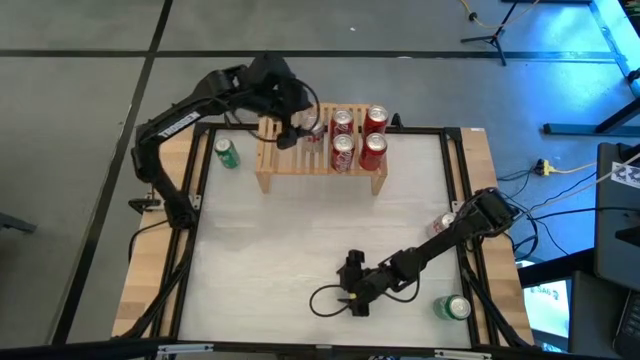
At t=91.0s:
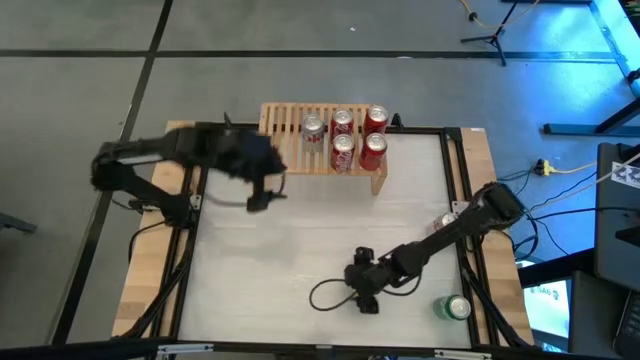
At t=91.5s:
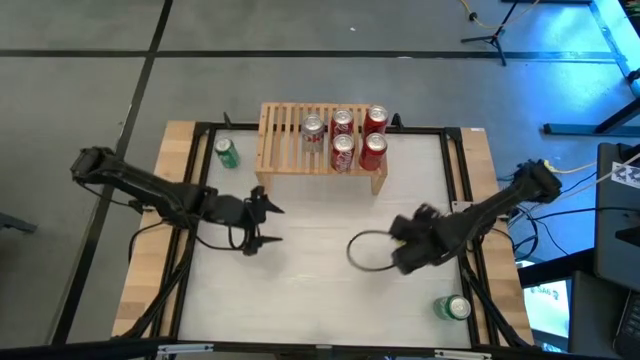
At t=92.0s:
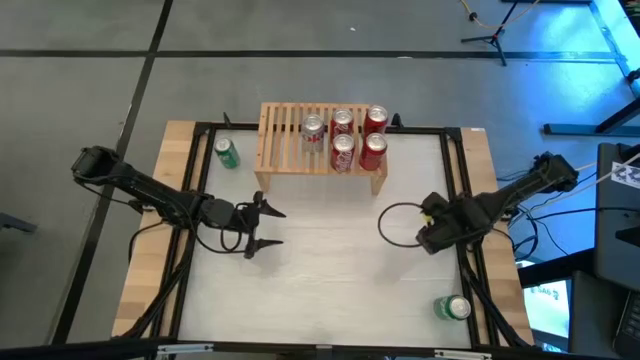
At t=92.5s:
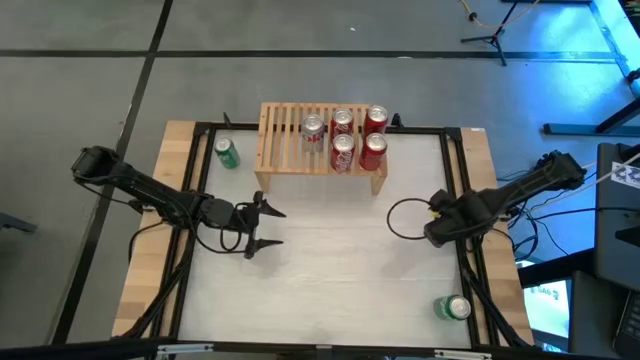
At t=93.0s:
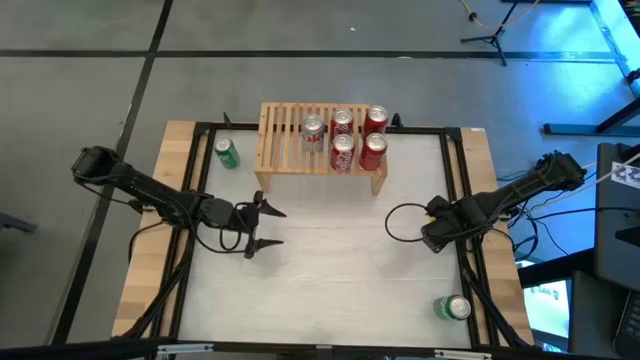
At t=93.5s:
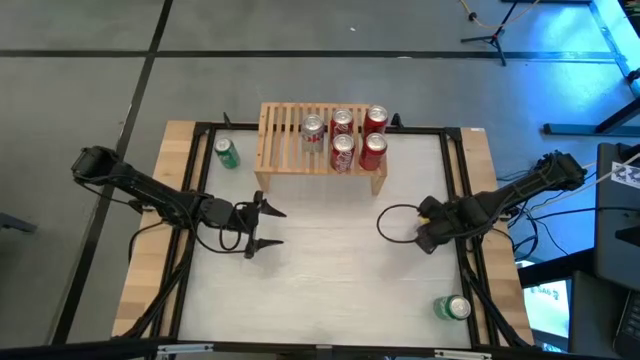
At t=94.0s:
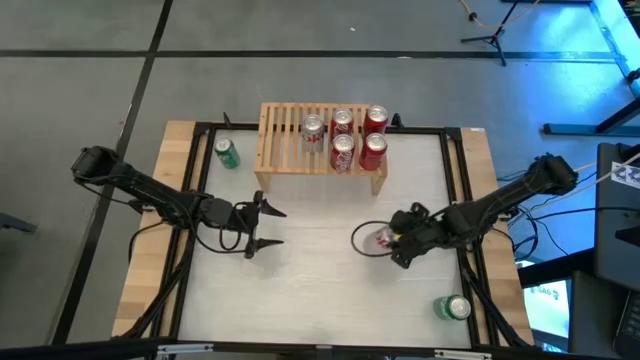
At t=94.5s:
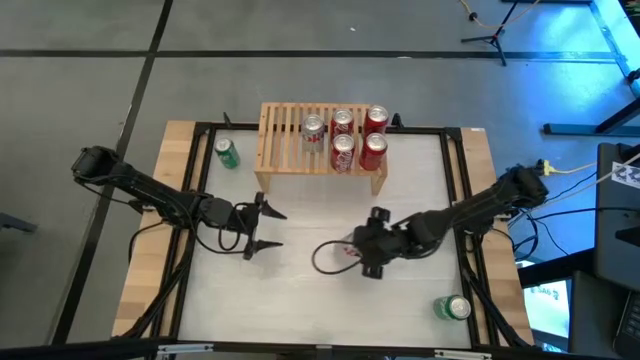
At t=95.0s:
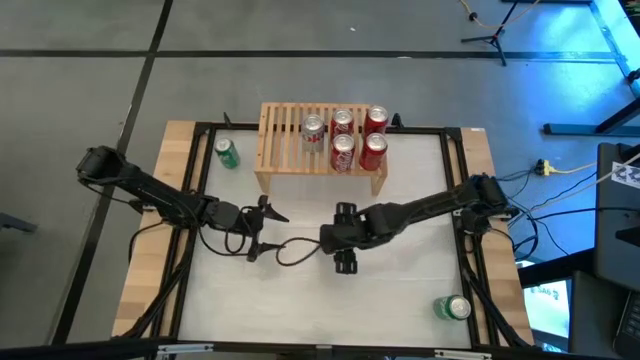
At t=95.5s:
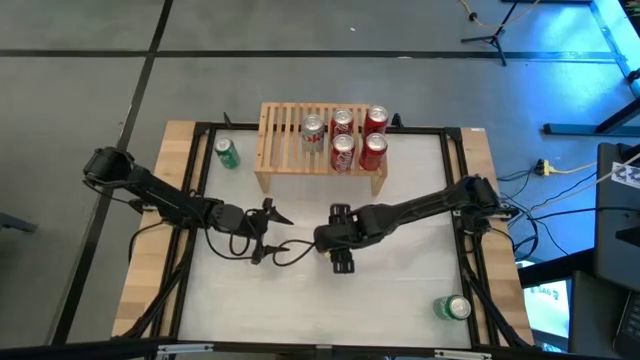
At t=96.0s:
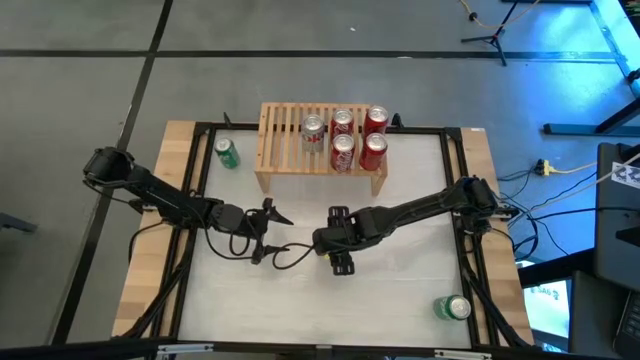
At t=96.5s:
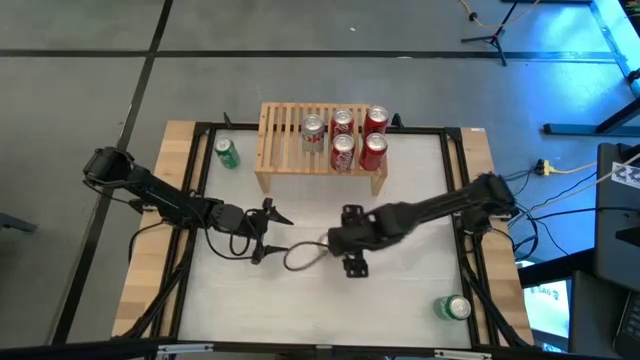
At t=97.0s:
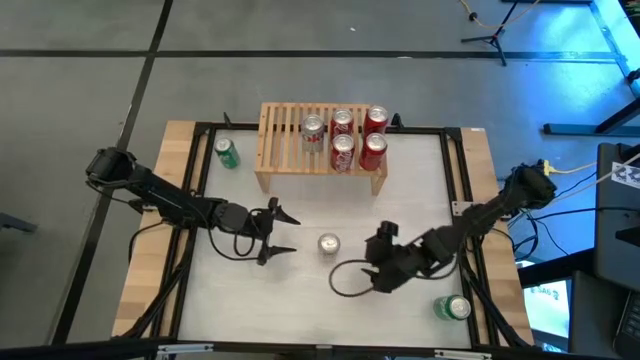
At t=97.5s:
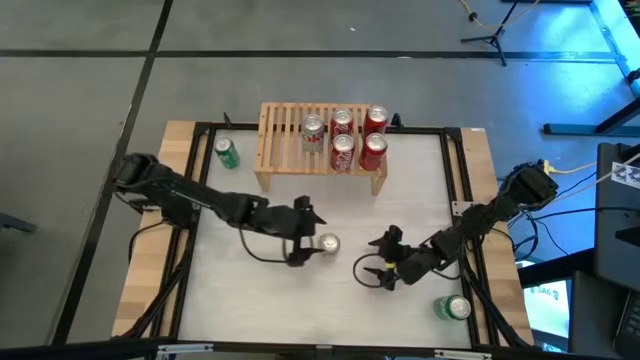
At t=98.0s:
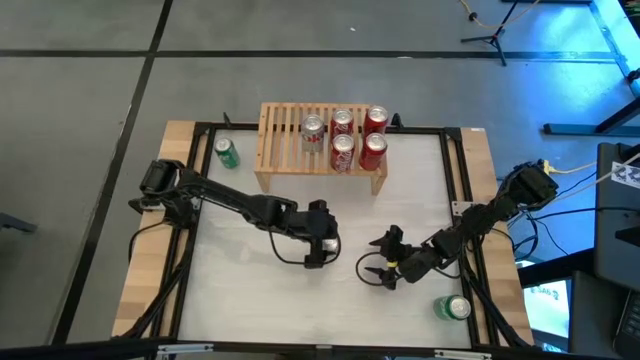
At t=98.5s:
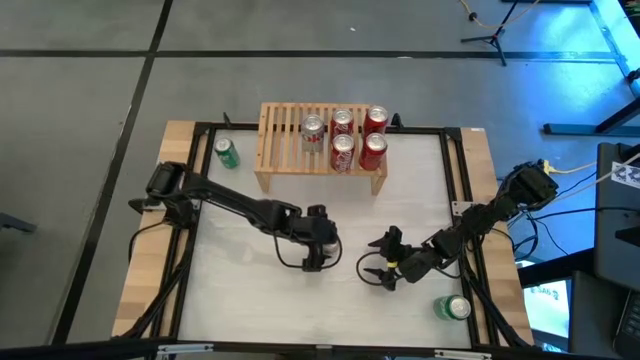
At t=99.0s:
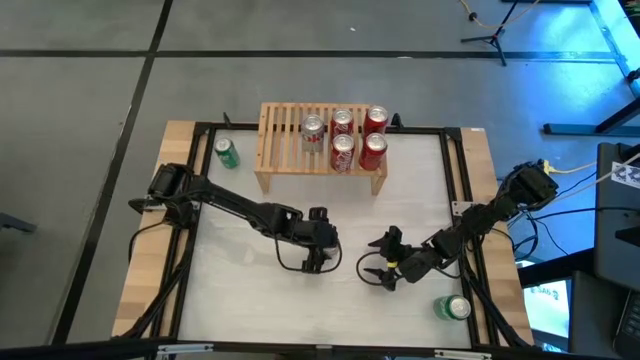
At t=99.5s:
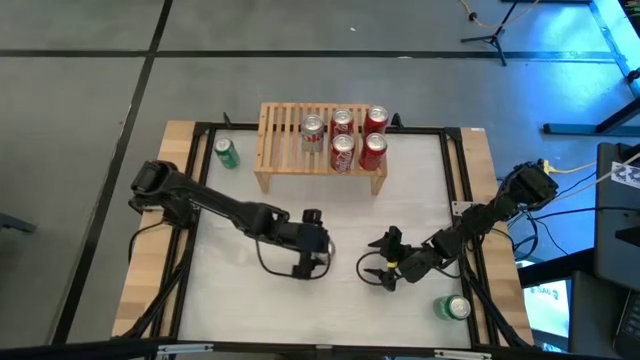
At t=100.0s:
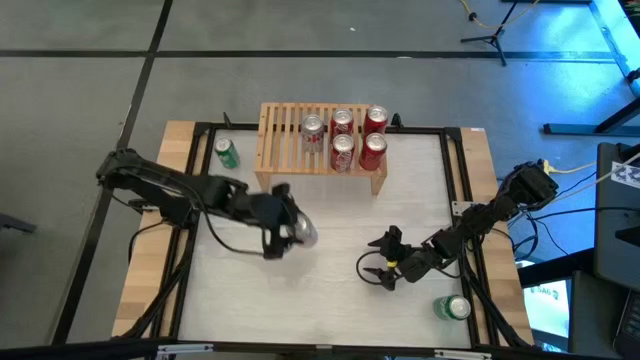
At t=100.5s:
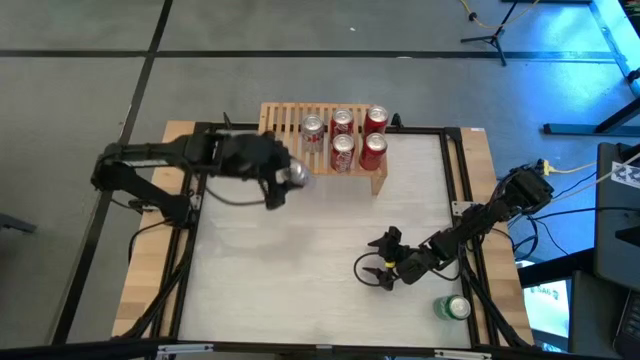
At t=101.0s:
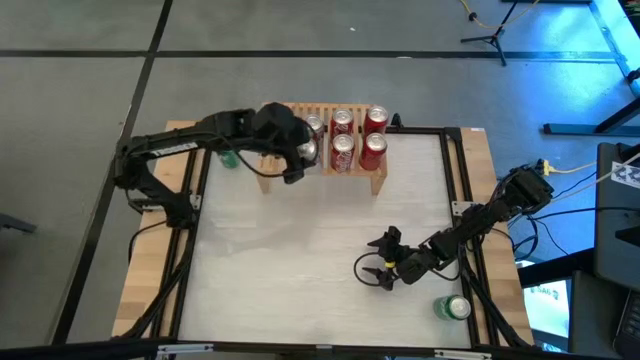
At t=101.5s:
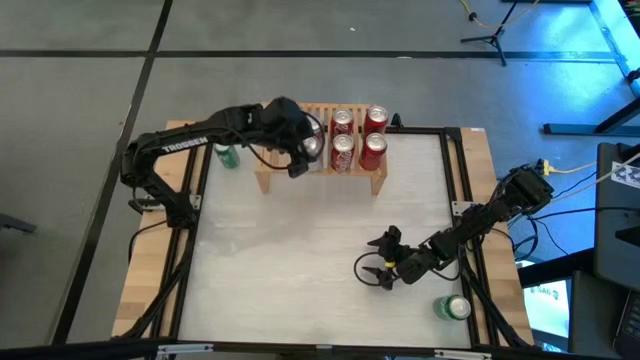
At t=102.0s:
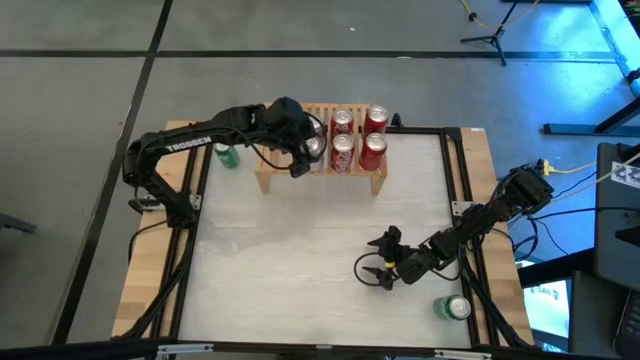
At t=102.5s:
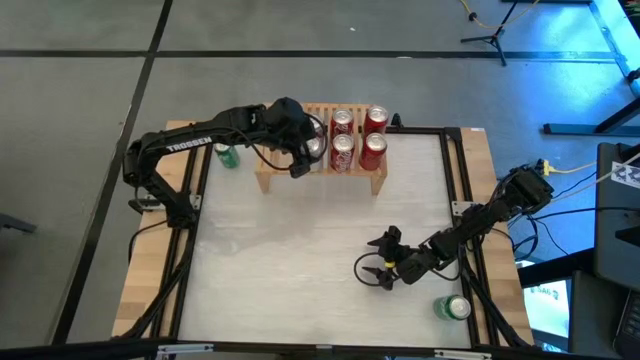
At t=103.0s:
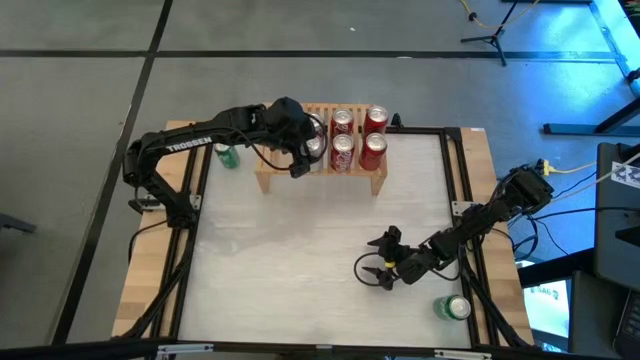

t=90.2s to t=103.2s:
Task: Place canned beverage on shelf
Put the white soda can on the shelf

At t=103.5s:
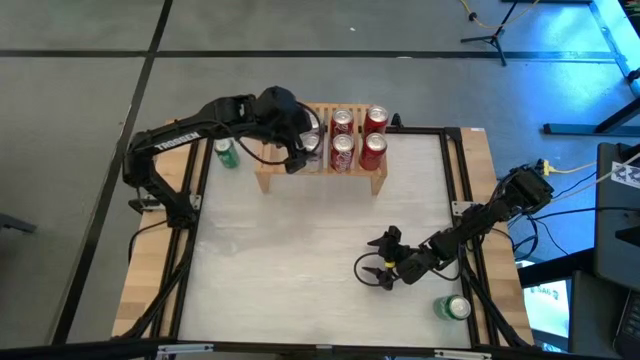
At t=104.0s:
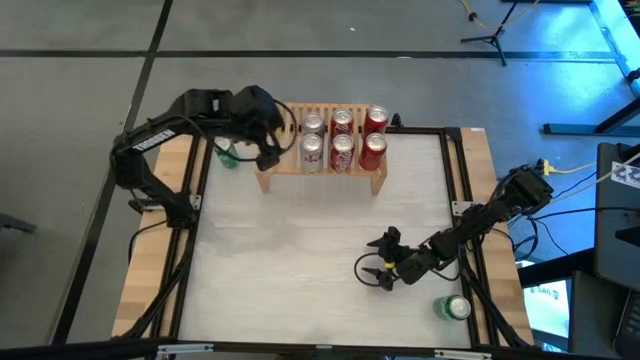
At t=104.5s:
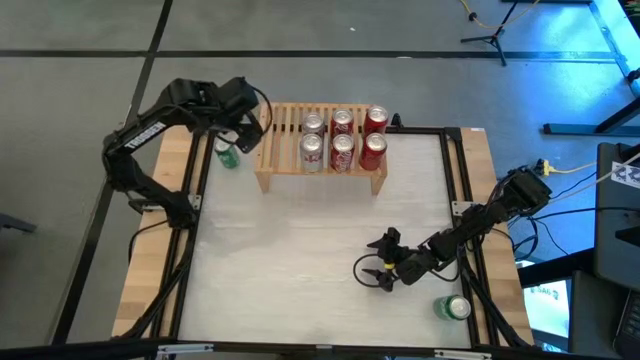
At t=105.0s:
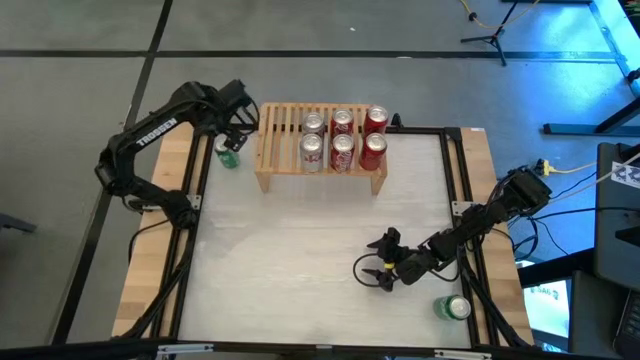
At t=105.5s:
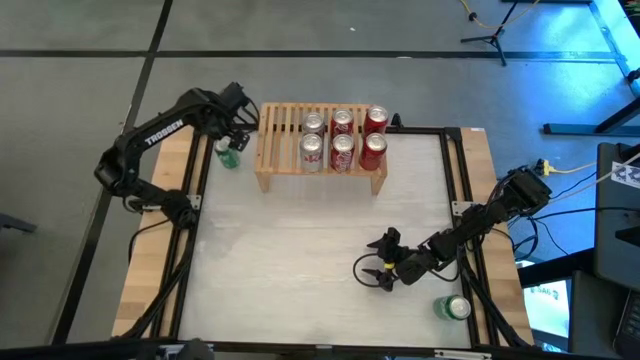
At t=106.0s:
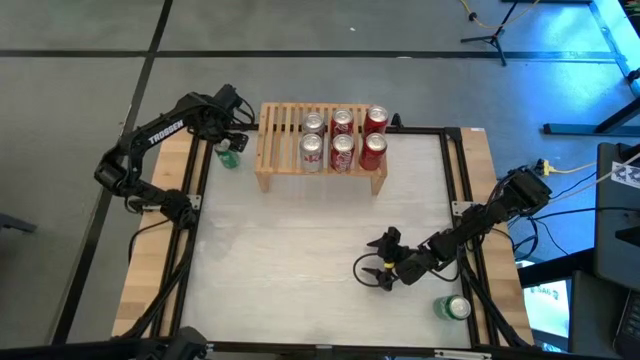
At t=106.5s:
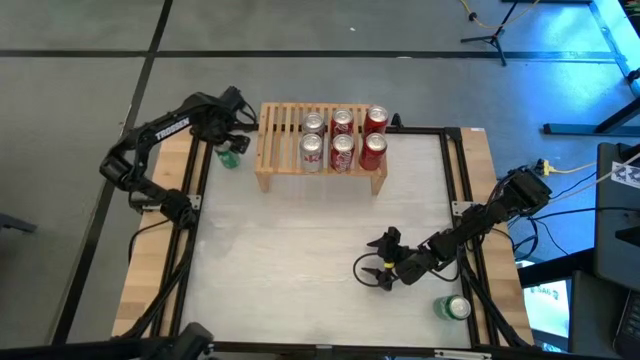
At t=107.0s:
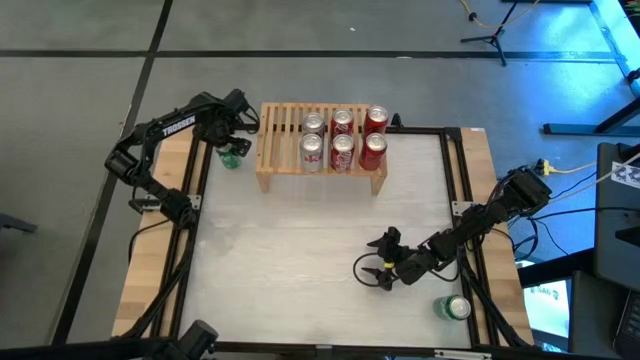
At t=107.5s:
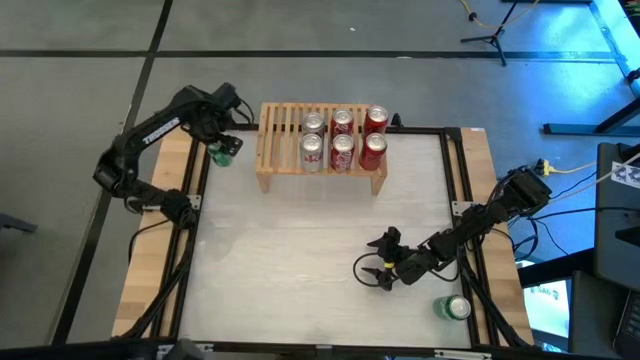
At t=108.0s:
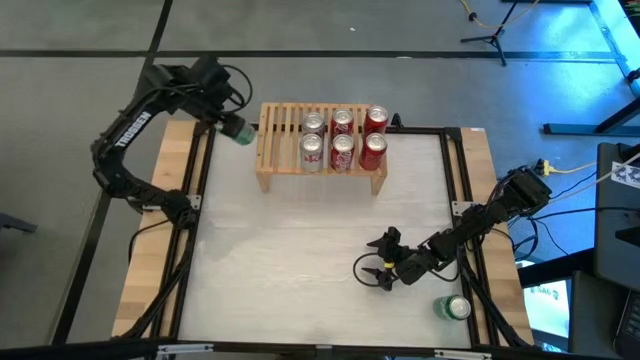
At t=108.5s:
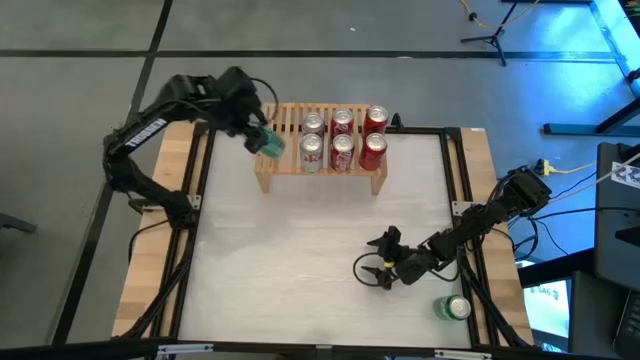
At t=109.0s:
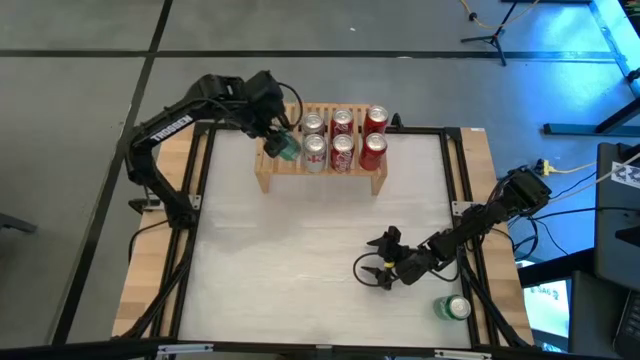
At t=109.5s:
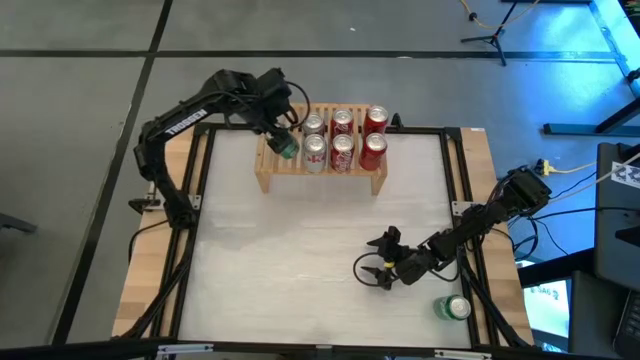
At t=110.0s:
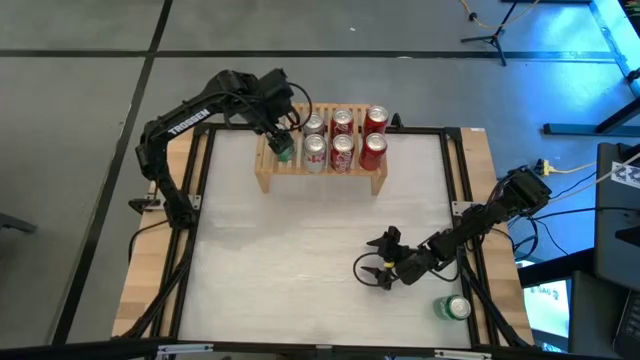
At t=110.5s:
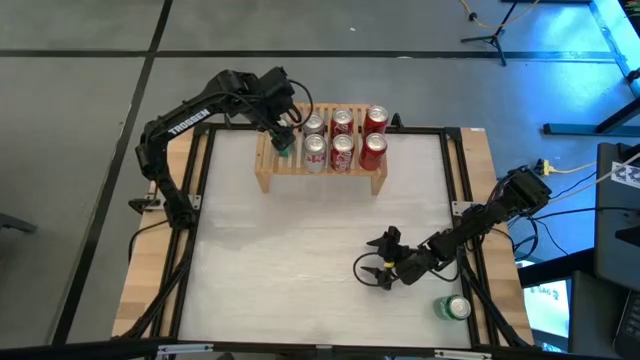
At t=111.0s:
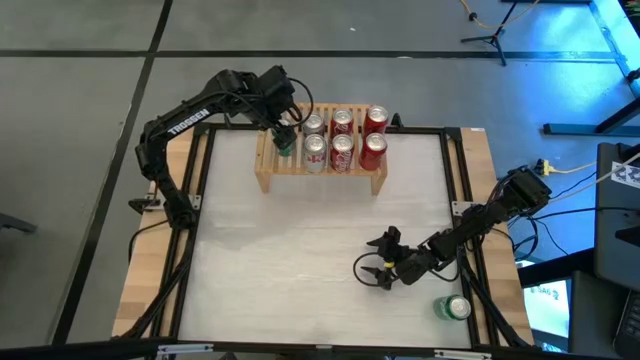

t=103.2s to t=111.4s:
Put the top green soda can on the shelf
